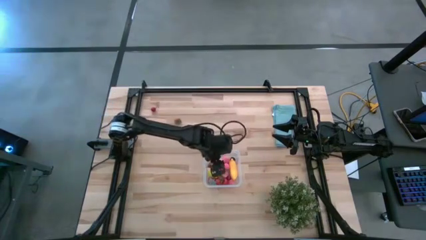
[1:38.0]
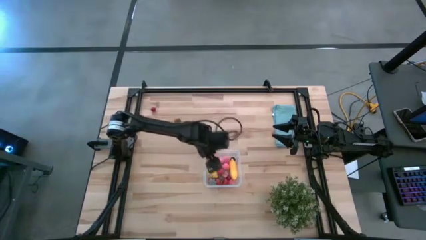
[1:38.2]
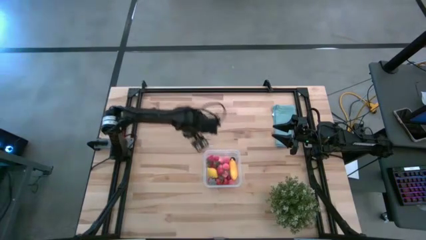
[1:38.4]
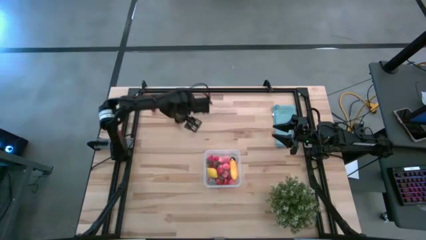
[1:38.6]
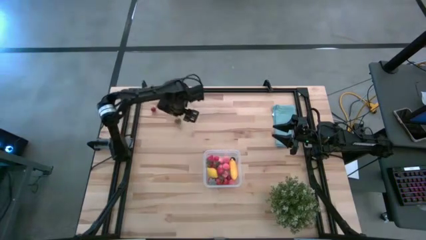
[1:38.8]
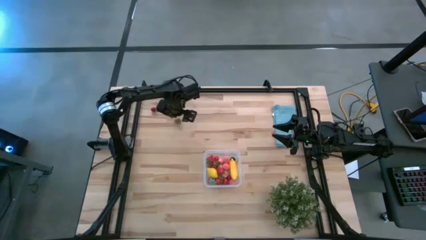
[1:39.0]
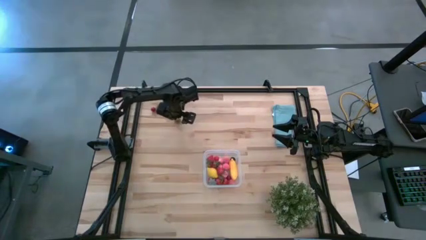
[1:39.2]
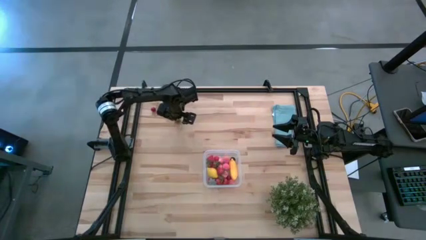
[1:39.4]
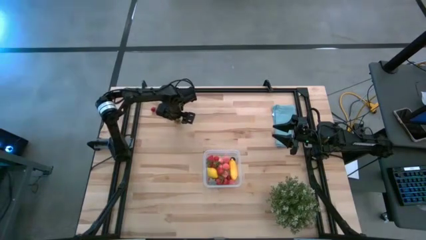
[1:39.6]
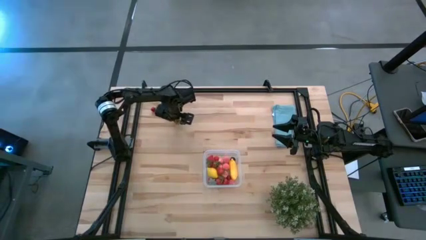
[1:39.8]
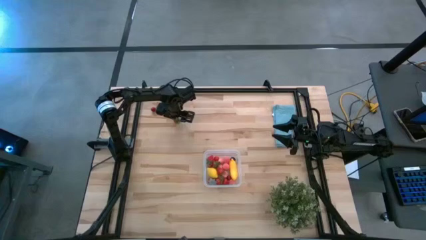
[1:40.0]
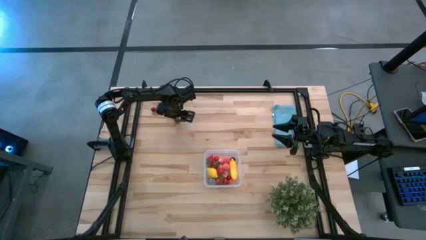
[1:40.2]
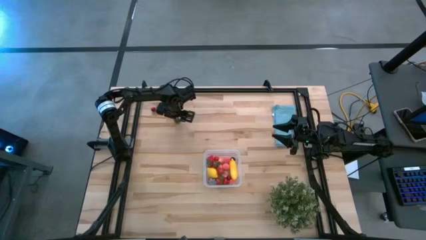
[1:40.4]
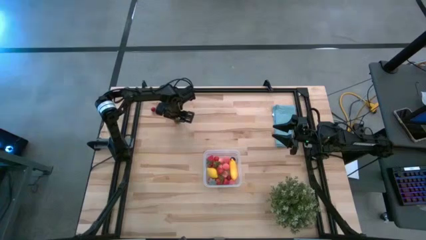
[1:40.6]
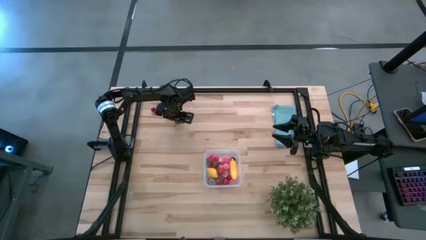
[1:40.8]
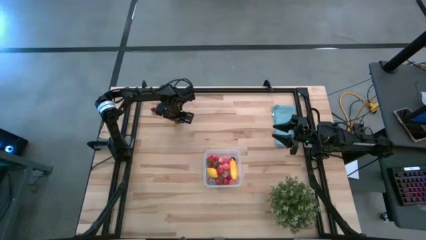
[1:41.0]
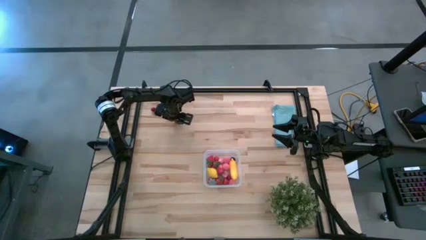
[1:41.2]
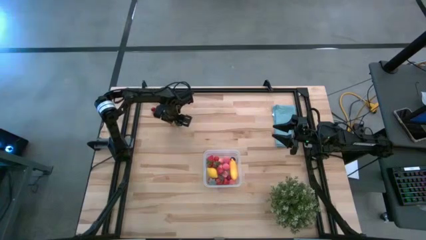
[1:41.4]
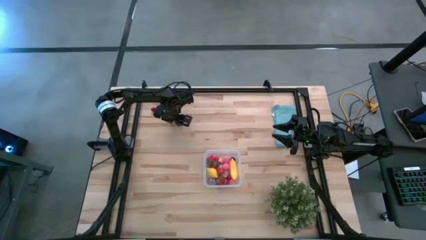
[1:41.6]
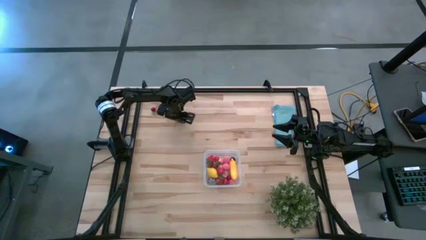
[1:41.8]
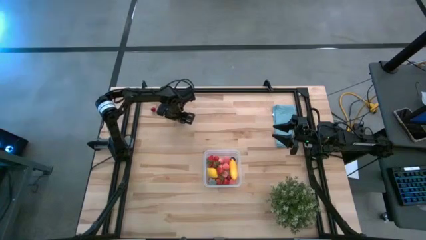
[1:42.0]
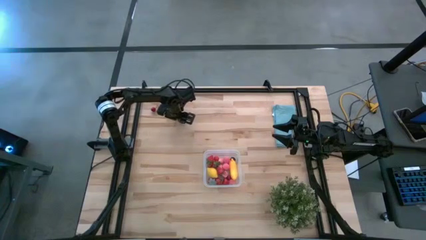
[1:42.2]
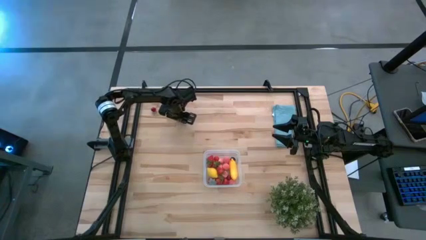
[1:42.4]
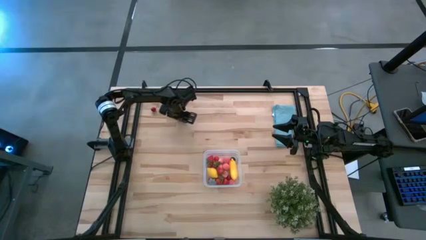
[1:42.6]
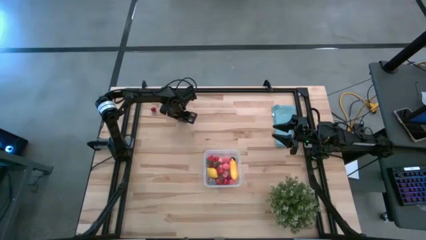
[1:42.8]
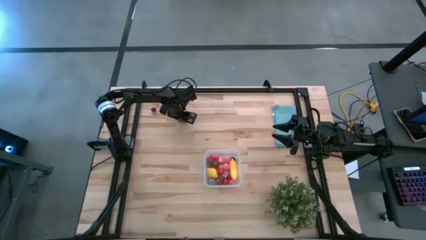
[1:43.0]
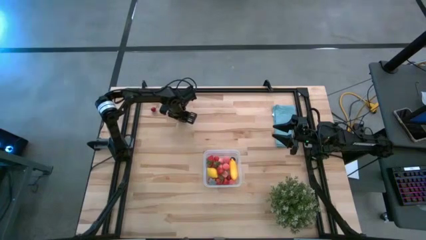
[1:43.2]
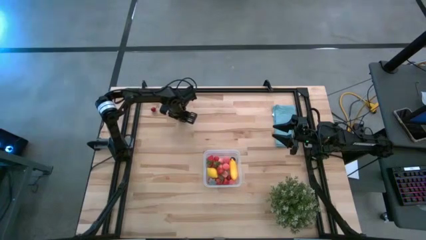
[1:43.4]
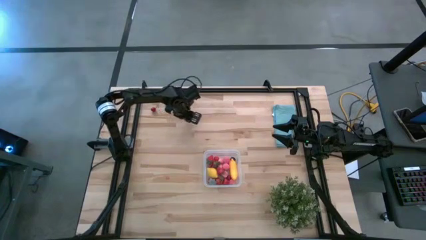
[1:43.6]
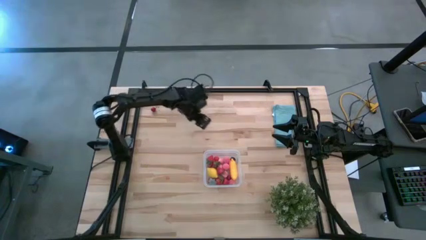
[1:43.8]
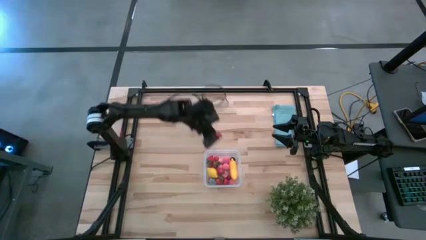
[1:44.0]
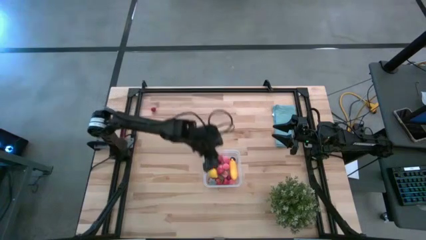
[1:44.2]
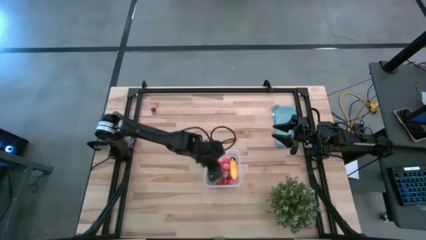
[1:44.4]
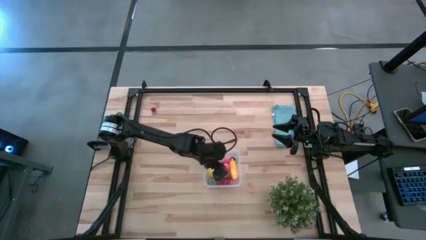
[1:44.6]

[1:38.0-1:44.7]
Task: Pick and placing Produce into tupperware
Put the red strawberry into the transparent bin

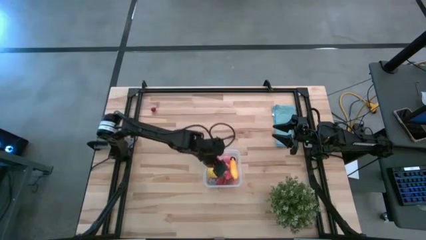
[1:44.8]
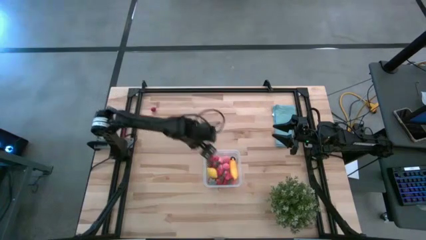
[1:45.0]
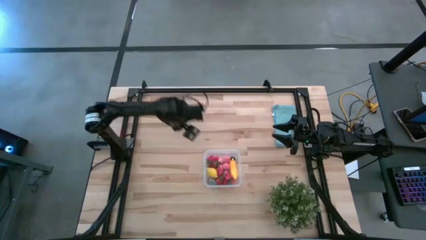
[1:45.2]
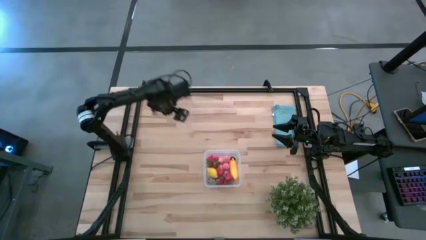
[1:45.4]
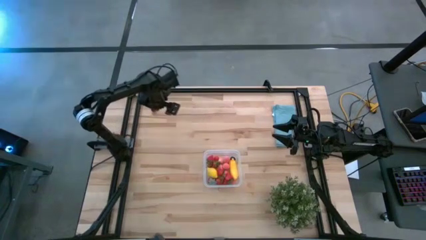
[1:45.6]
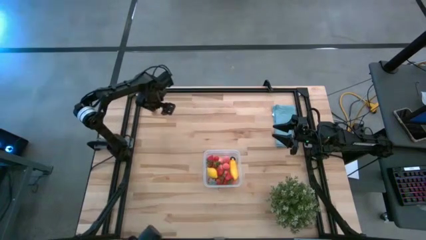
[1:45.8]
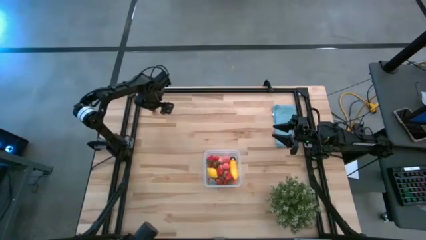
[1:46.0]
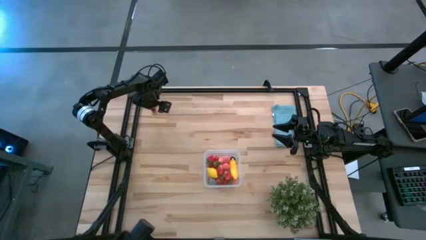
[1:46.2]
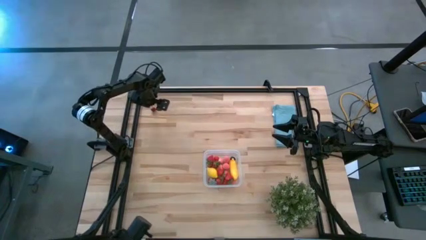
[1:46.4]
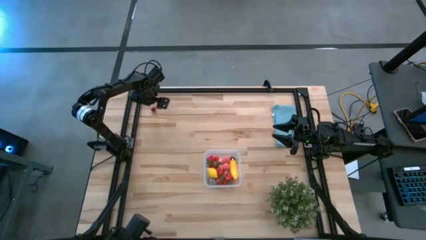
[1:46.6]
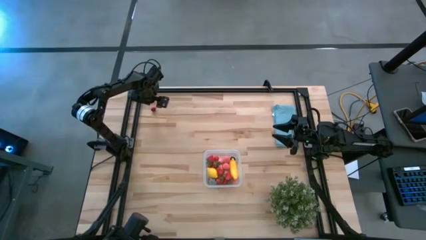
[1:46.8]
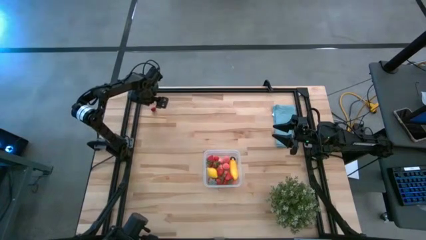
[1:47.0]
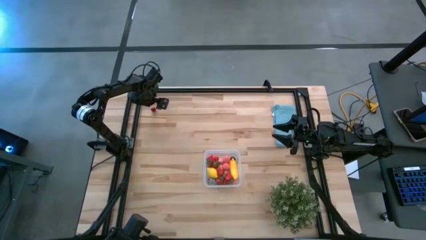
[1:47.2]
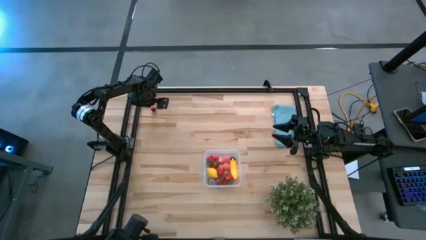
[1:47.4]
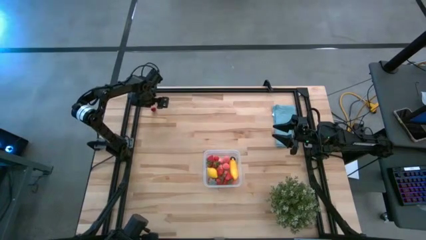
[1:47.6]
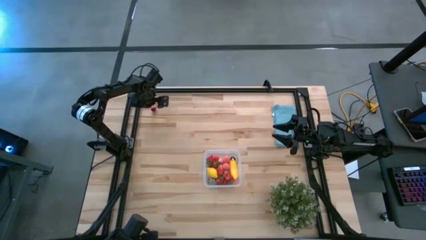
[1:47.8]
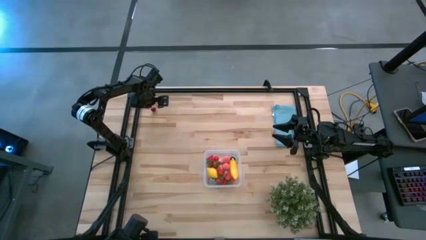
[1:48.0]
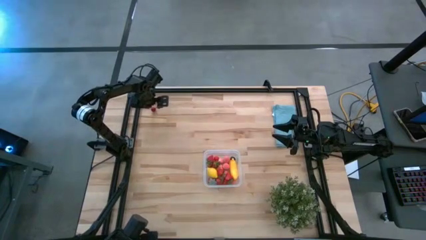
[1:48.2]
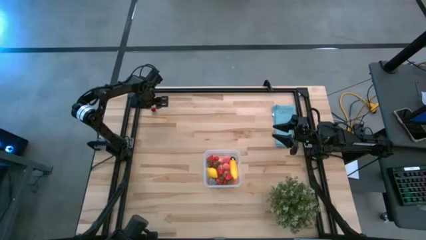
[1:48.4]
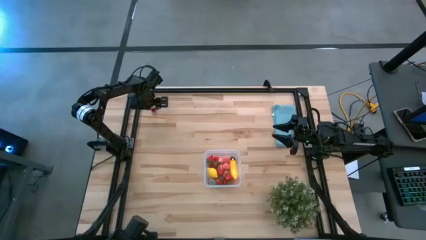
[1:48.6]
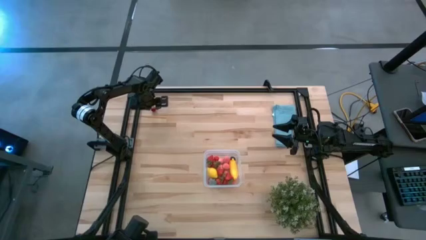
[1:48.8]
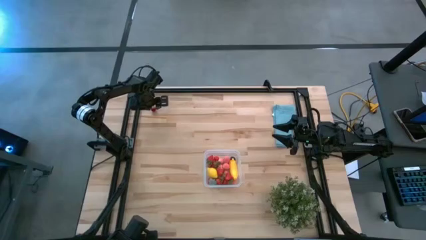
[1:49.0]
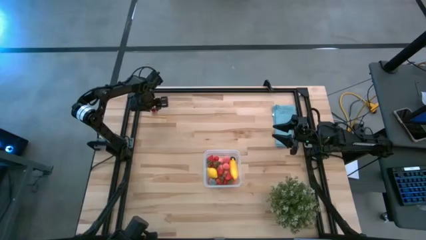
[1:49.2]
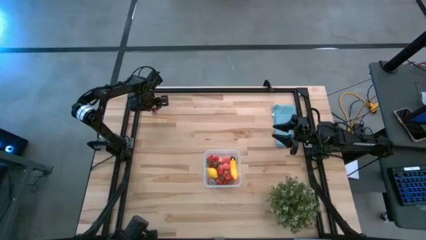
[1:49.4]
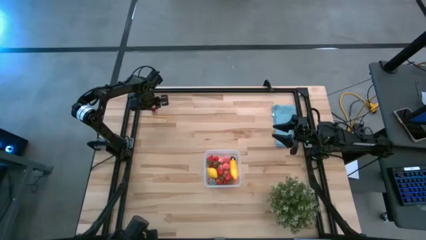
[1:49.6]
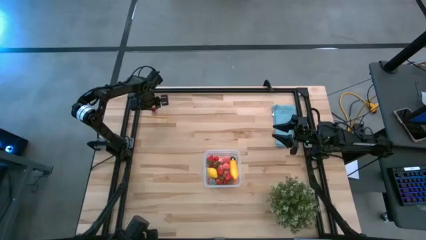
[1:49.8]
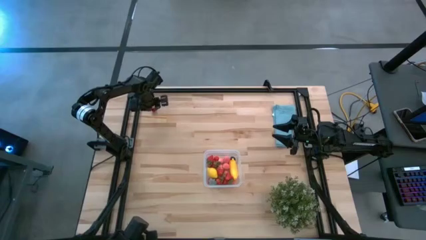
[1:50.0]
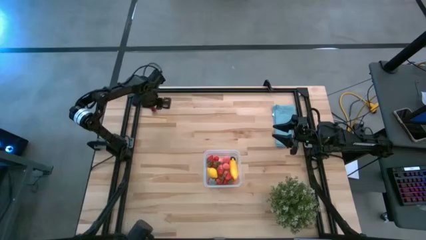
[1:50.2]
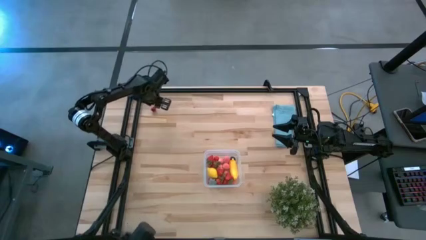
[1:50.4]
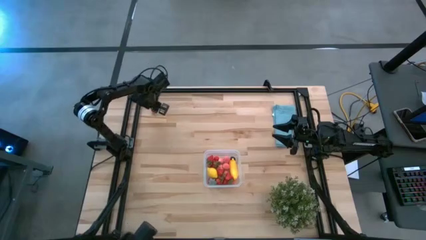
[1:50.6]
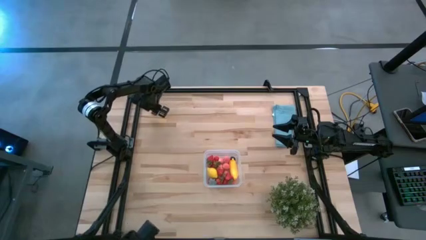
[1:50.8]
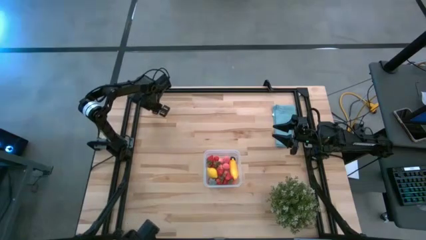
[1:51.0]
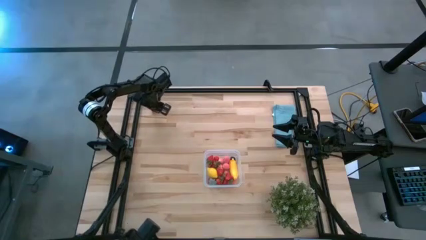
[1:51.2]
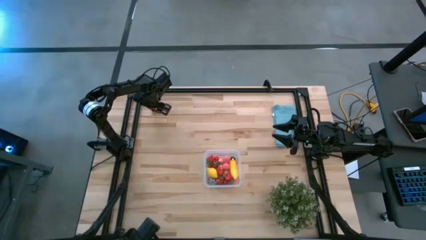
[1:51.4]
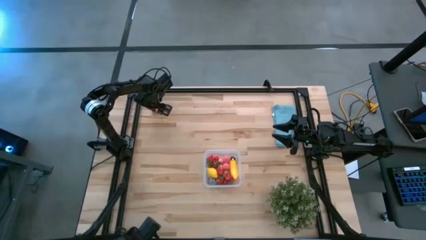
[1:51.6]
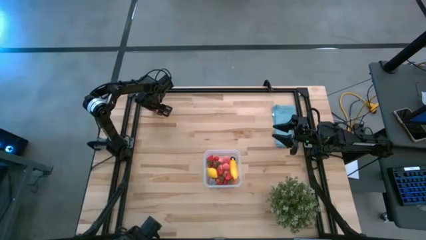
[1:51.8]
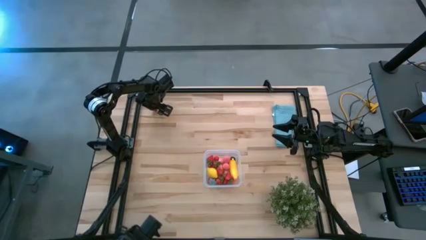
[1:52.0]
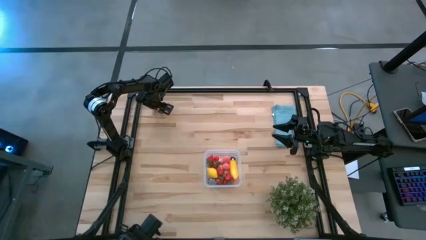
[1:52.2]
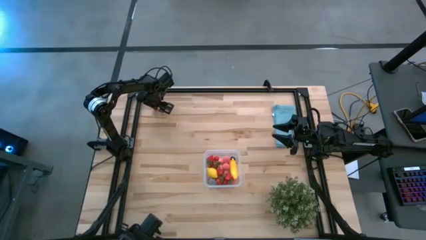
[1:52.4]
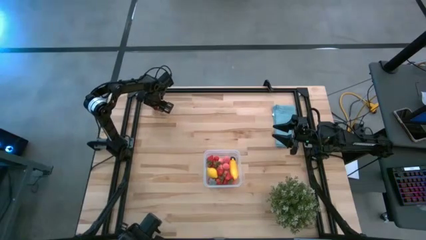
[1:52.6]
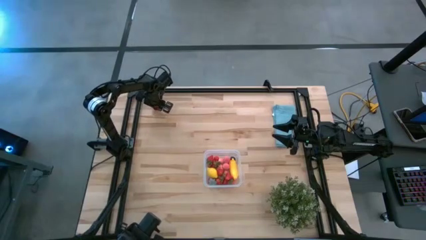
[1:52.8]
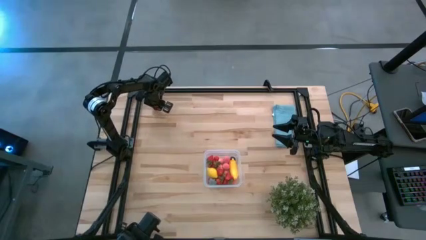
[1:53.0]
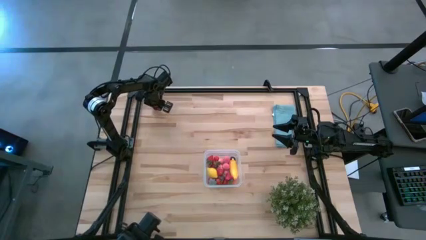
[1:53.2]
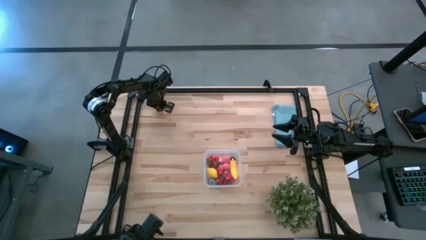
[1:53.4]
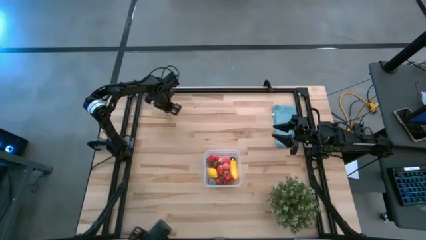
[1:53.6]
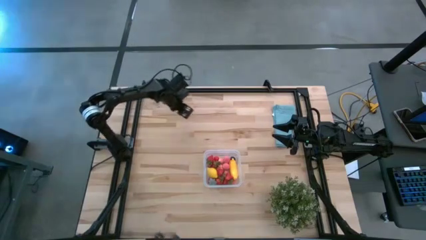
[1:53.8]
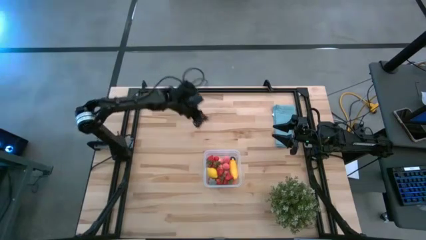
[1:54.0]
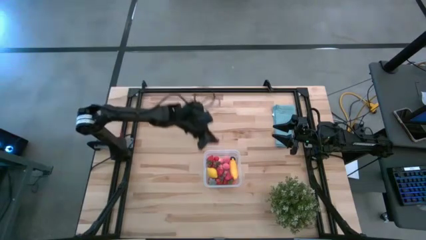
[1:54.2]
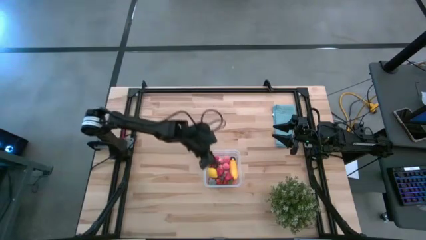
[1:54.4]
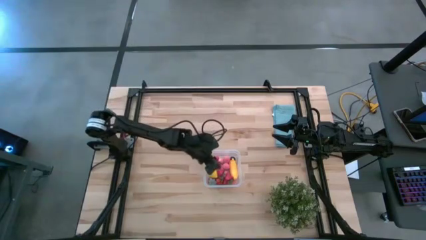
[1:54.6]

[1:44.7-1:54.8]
Put the red cherry into the transparent bin
